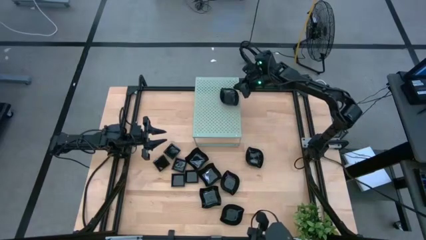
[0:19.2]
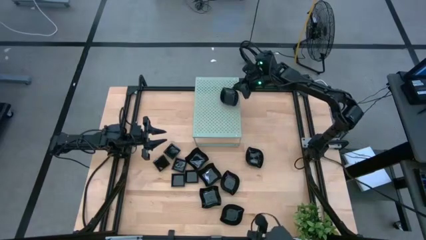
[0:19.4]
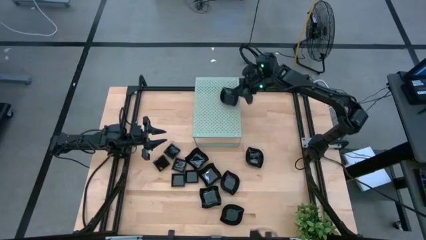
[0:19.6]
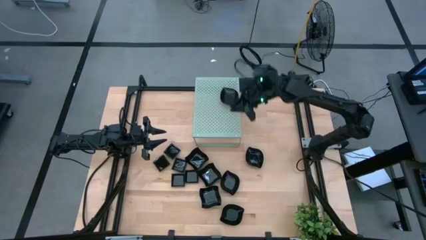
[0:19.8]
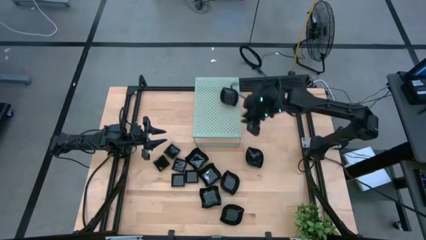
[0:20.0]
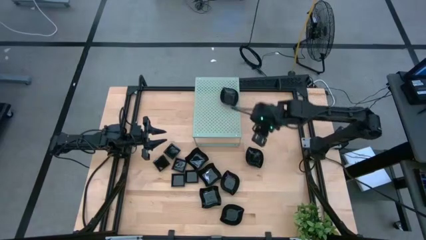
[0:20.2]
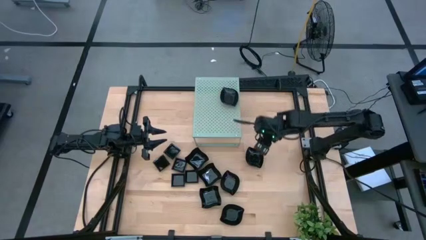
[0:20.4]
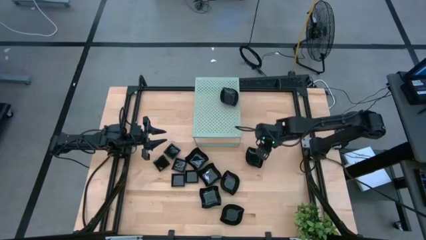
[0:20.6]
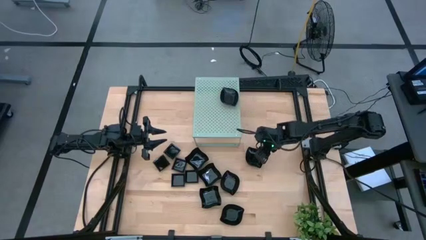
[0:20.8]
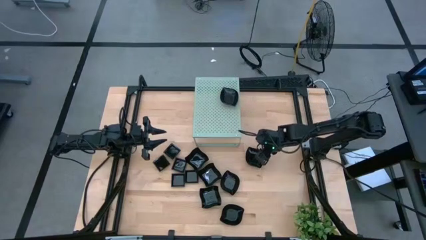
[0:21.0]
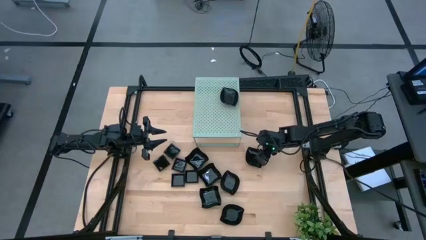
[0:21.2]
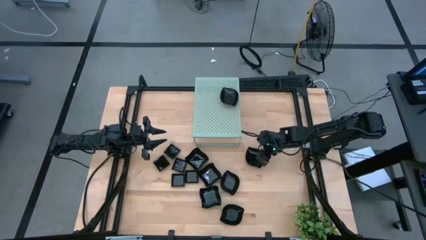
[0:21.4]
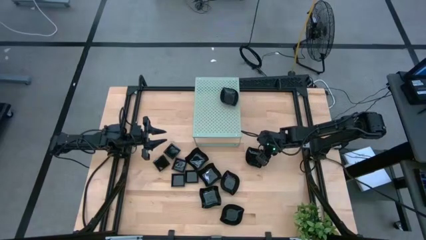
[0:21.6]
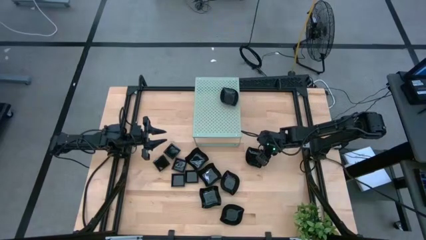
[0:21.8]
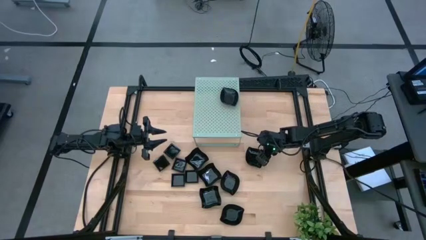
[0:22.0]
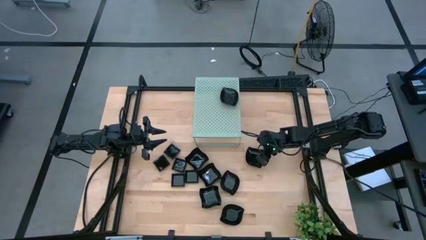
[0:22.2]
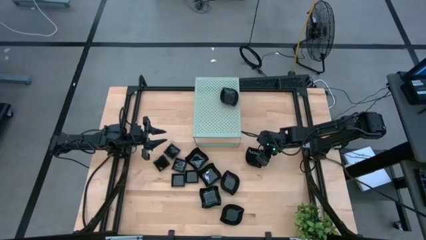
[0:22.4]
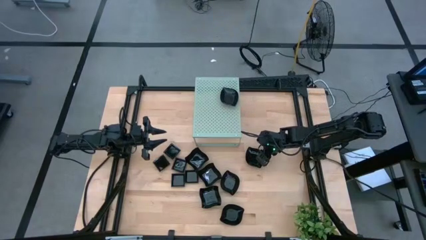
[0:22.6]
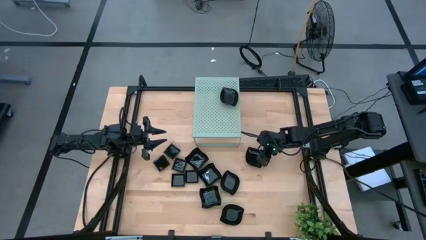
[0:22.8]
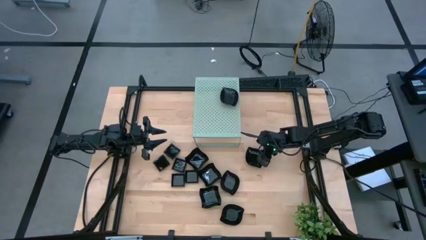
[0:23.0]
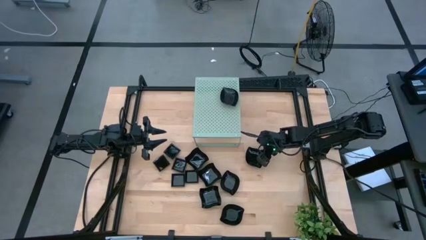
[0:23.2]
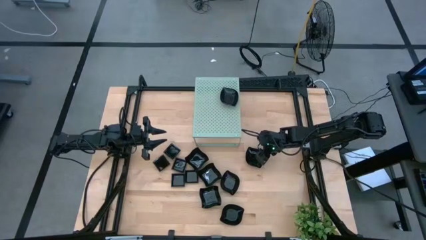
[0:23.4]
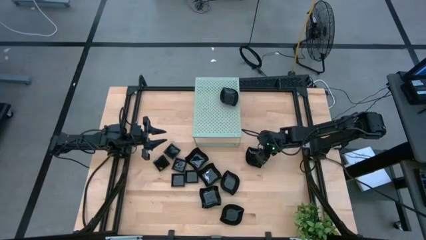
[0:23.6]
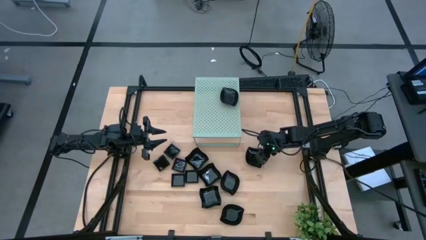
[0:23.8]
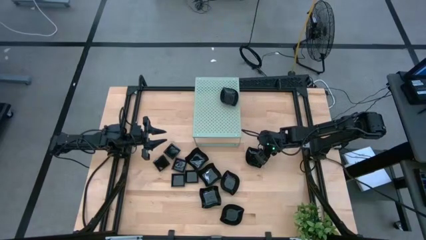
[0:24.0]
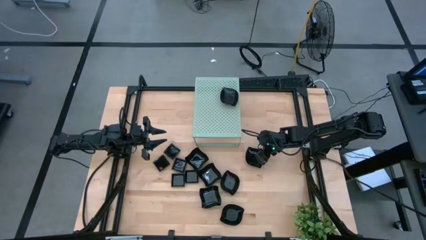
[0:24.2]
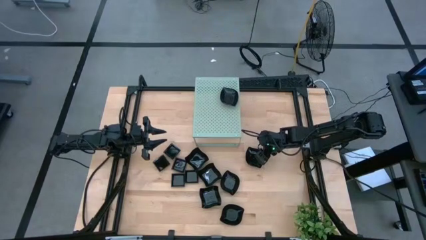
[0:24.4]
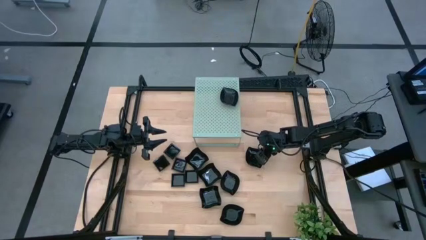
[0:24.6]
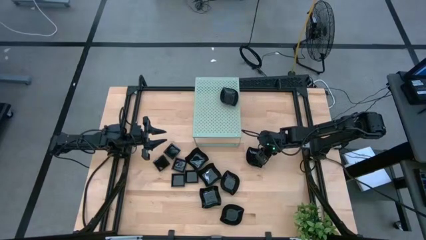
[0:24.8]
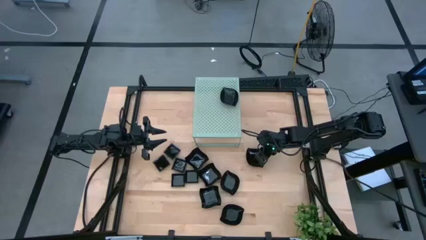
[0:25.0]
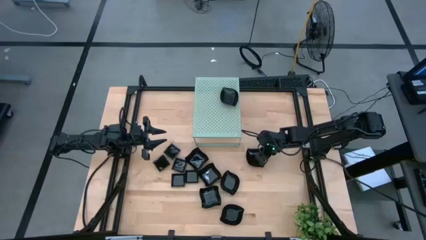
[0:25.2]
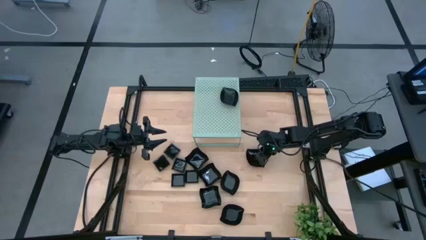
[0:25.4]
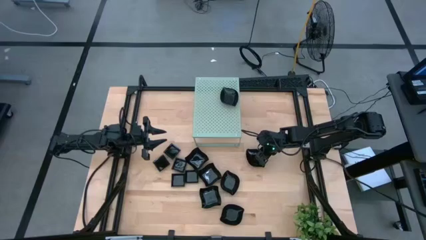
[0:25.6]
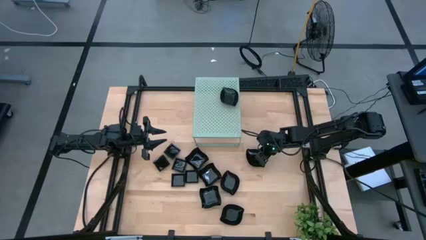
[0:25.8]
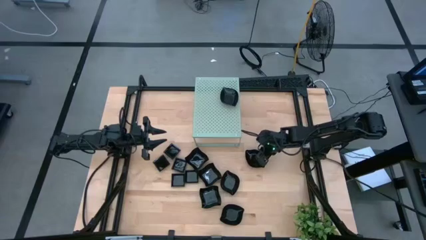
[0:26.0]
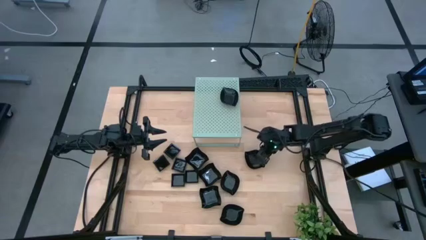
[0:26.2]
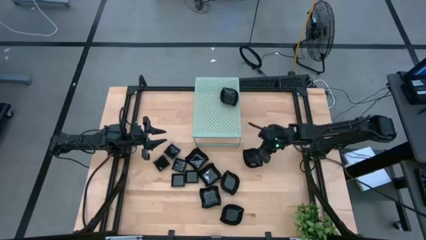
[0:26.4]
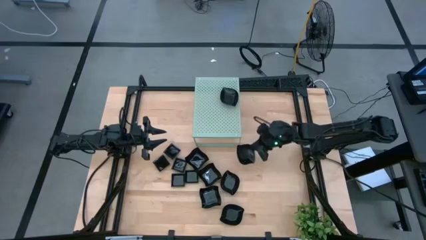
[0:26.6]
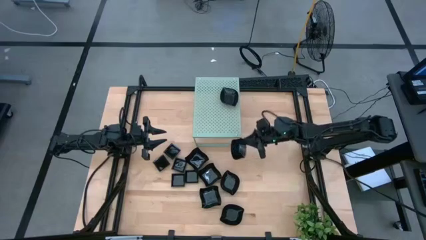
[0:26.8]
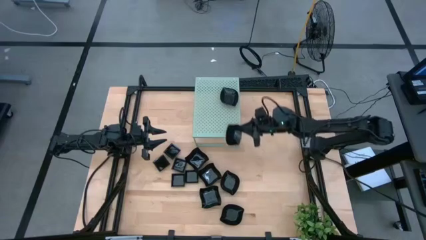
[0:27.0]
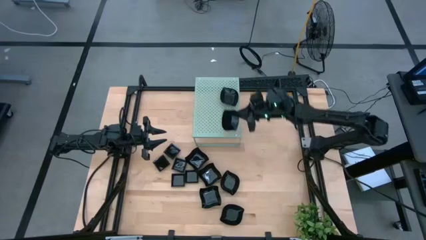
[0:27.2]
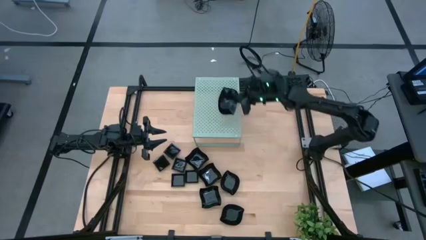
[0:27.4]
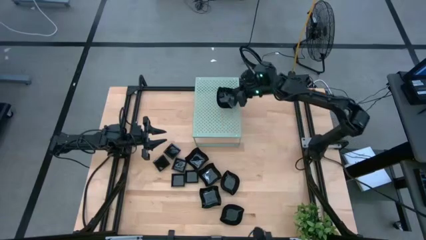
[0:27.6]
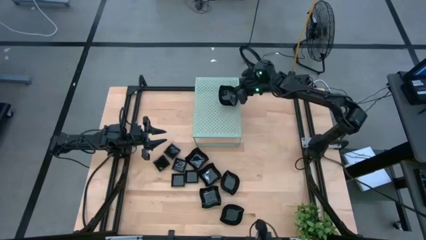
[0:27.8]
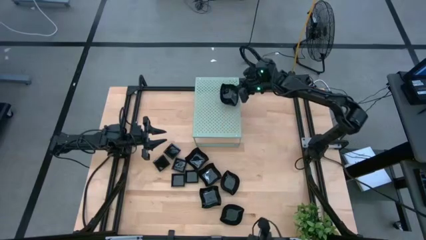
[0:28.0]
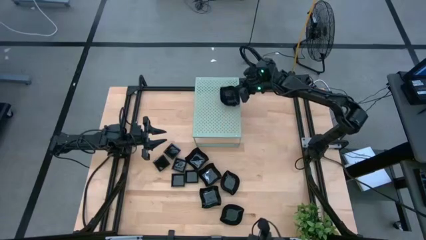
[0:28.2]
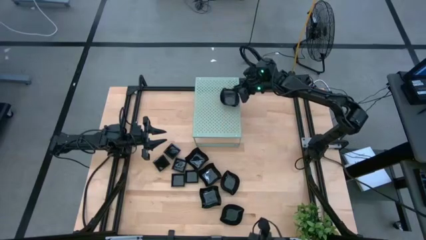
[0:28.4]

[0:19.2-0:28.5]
Task: Pick & Place Mini shaped plates
Stack the black leaf-shaped plate on top of the other leaf-shaped plates on the shelf

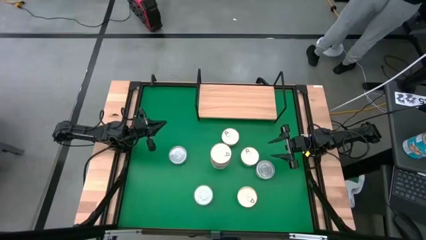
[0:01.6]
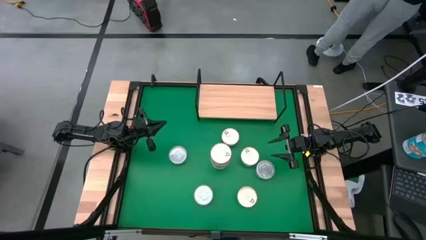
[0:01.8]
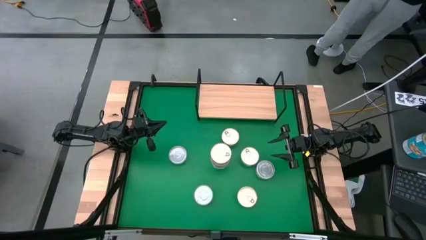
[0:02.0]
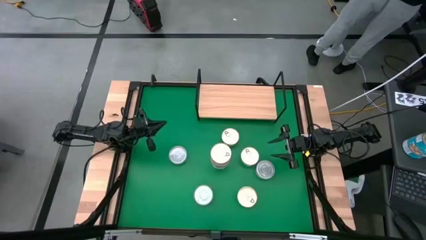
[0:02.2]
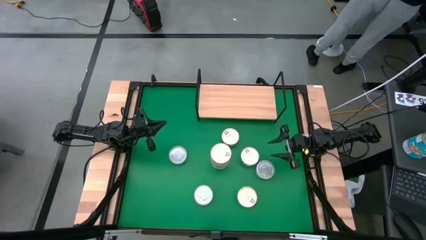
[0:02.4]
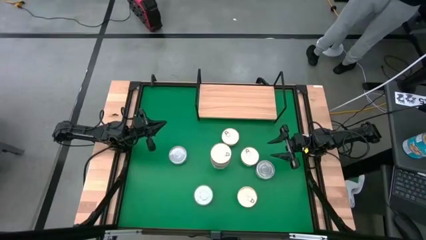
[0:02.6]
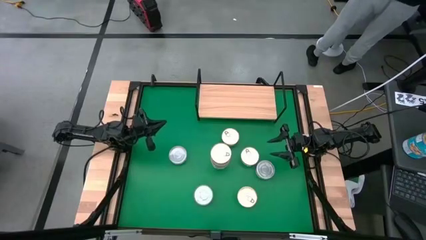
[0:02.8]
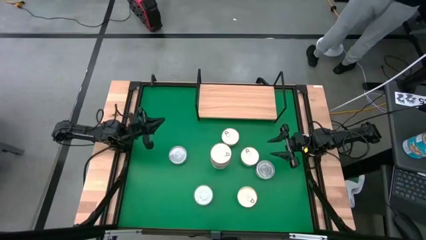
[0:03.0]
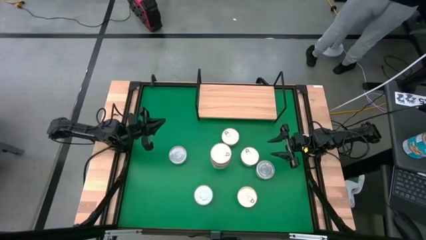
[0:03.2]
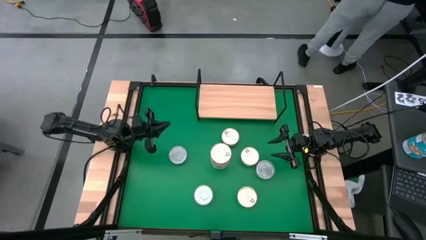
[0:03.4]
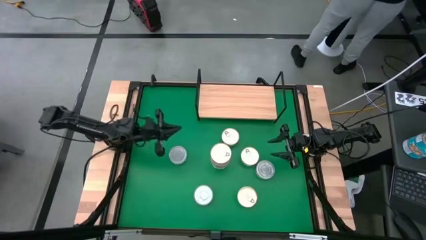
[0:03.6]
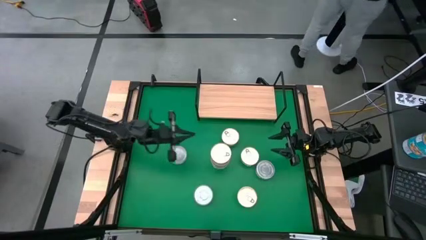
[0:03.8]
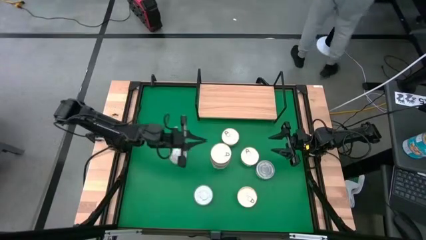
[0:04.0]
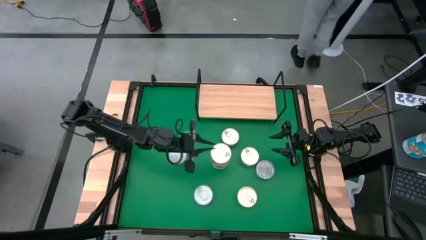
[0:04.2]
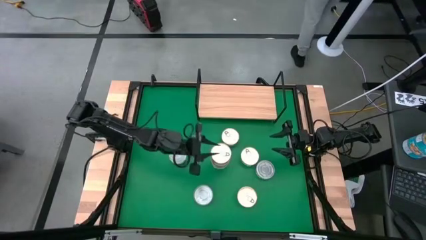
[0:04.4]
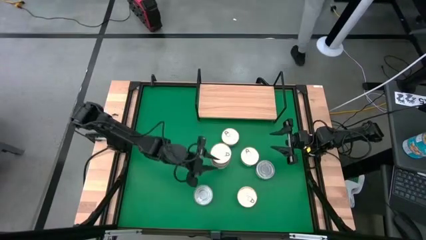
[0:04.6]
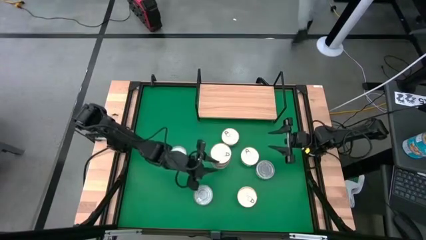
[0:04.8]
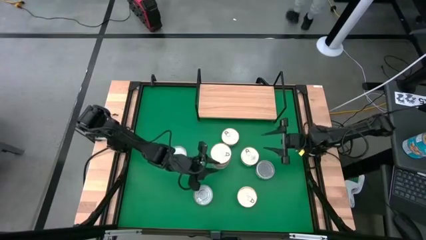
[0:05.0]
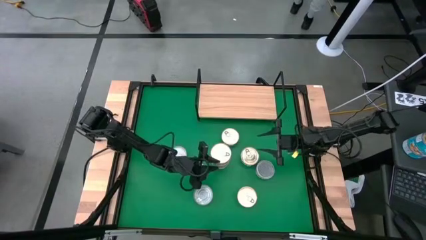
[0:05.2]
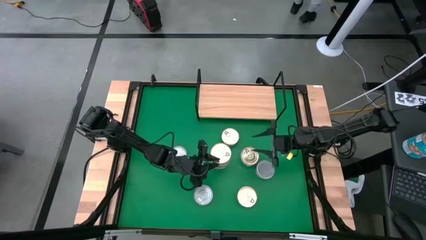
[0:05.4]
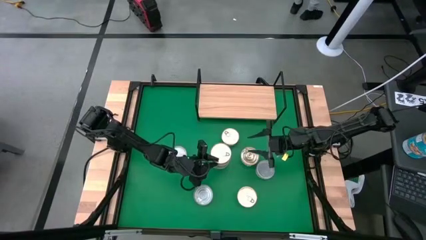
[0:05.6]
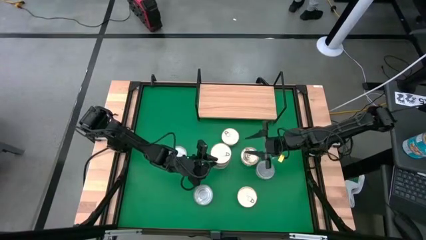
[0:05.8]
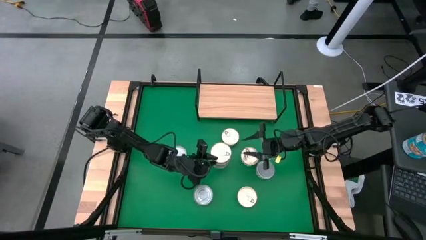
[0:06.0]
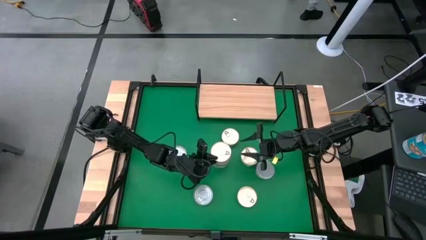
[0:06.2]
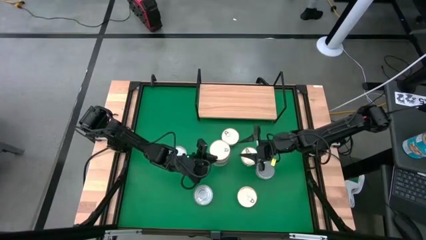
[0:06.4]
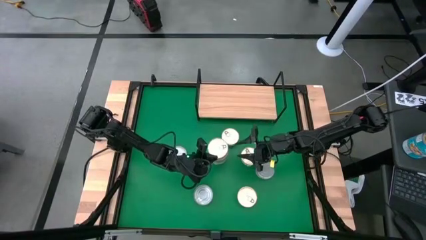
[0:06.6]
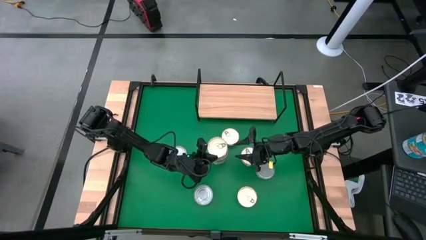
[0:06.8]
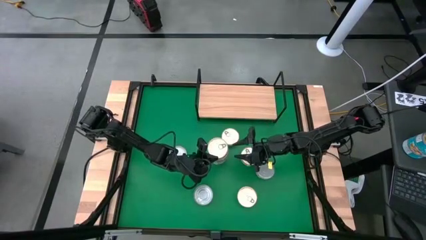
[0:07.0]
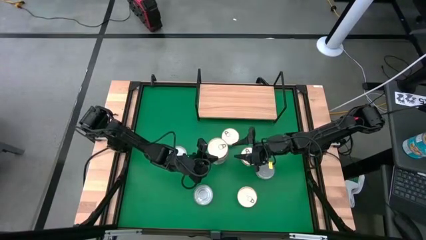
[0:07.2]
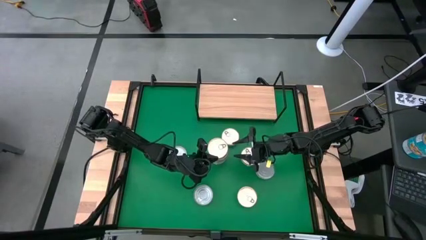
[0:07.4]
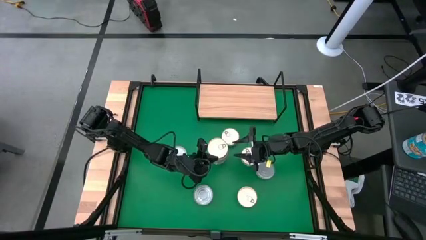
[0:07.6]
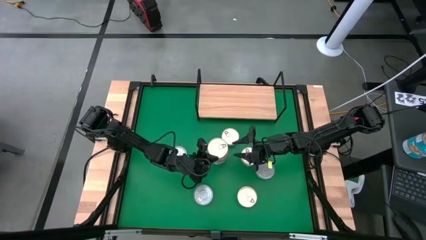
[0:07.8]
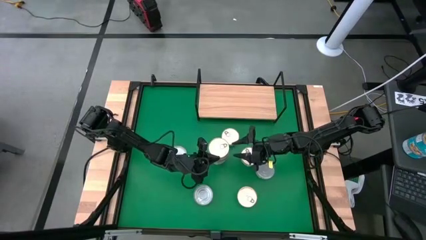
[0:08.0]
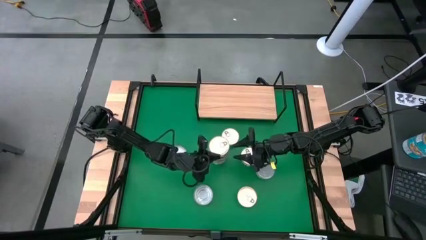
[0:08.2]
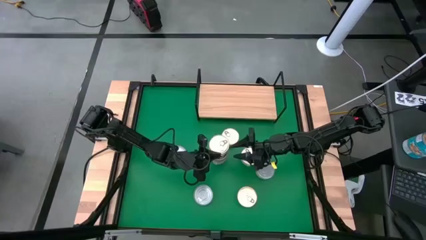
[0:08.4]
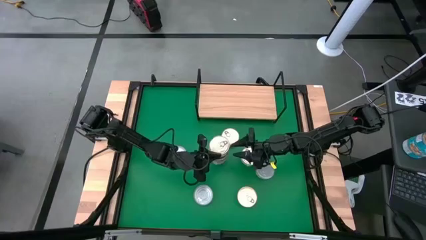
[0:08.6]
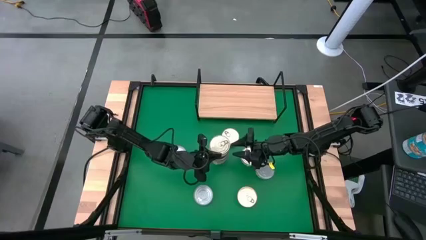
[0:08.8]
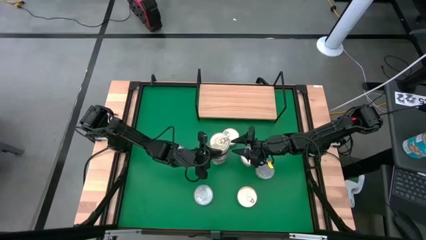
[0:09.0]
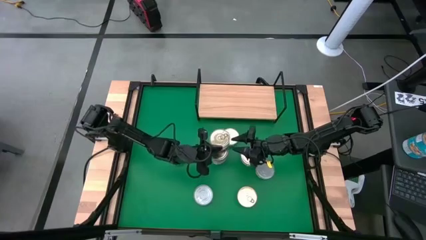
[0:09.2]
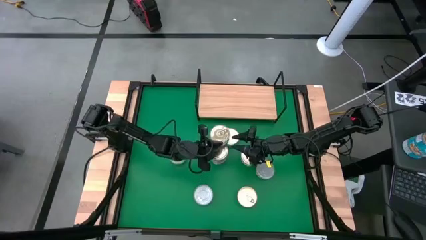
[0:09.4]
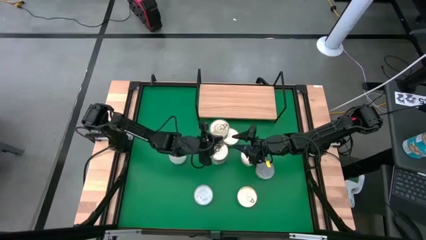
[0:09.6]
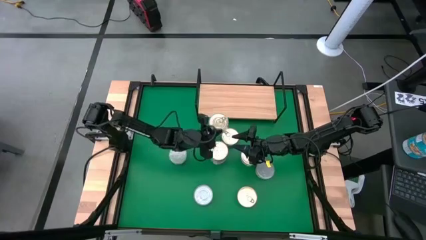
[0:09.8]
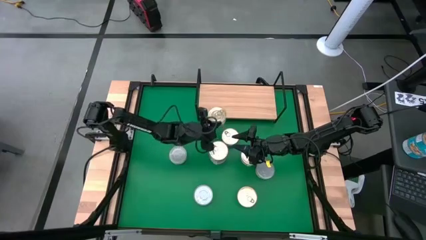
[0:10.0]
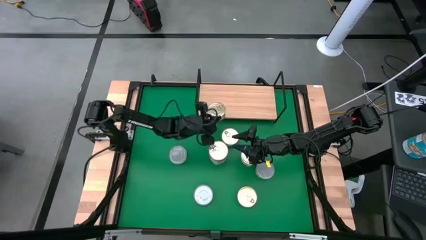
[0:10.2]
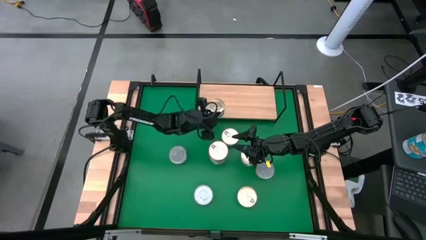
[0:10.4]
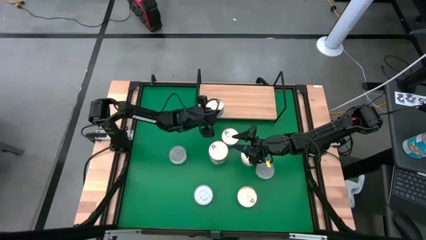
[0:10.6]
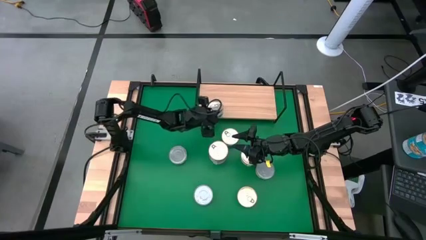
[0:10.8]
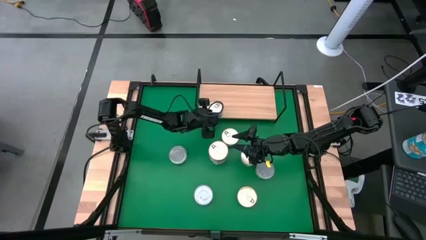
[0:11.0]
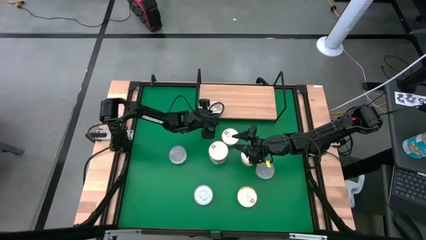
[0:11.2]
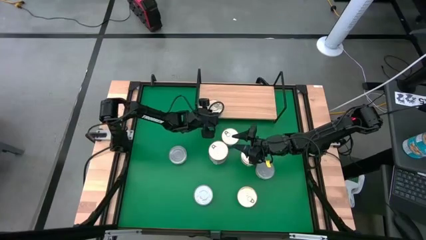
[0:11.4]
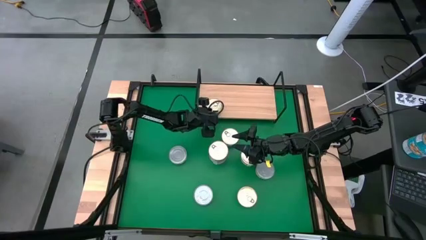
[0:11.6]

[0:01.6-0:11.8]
Task: Stack canned seafood by type on shelf
Put the blue tuna can on the shelf
